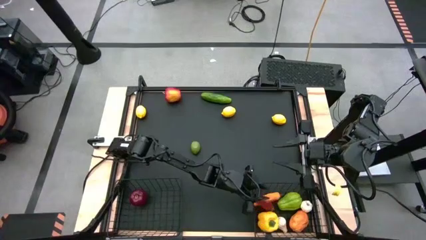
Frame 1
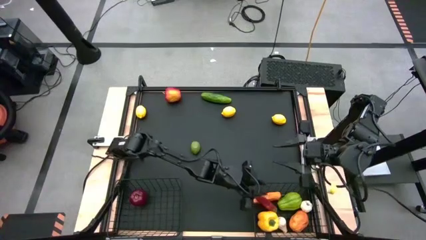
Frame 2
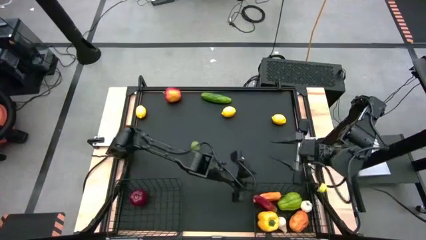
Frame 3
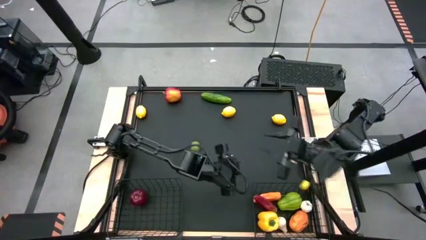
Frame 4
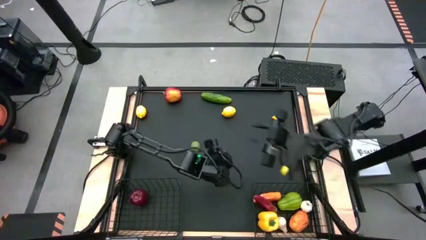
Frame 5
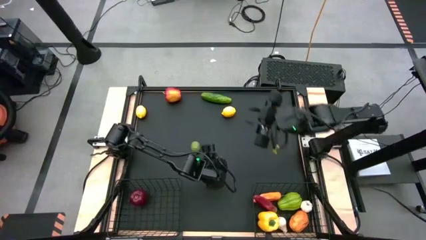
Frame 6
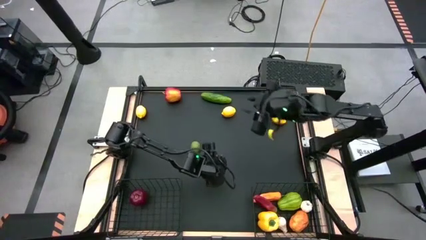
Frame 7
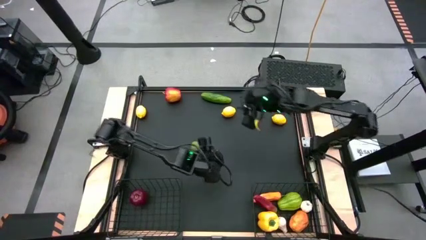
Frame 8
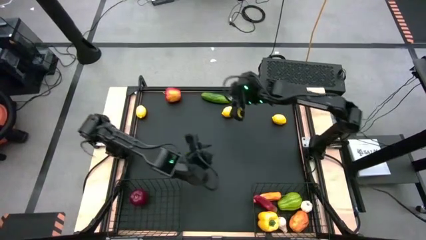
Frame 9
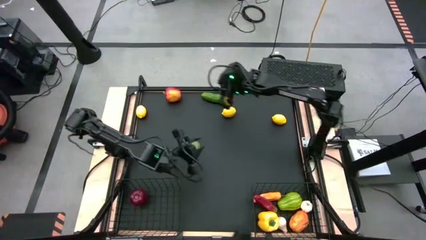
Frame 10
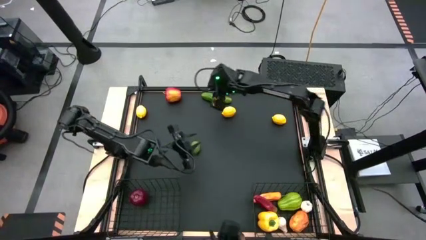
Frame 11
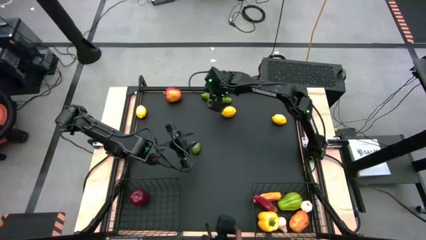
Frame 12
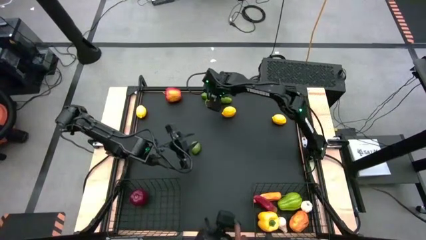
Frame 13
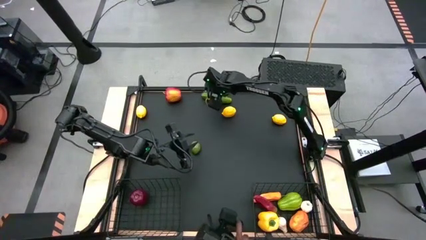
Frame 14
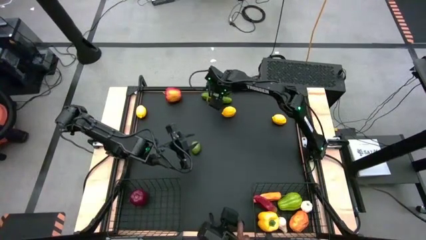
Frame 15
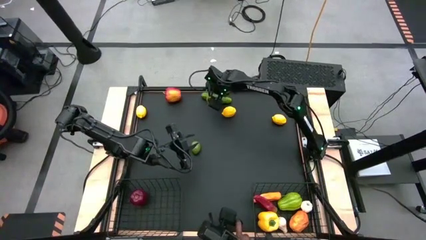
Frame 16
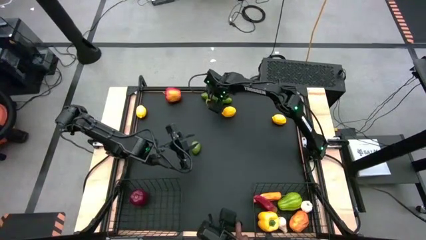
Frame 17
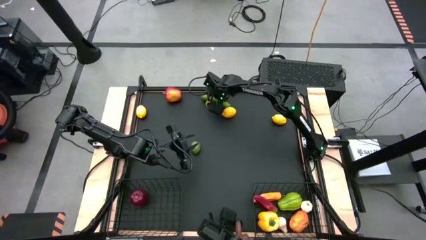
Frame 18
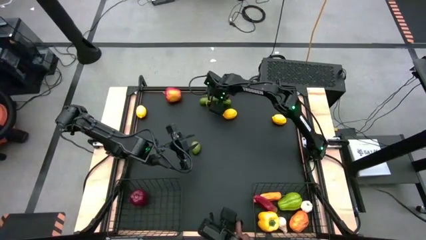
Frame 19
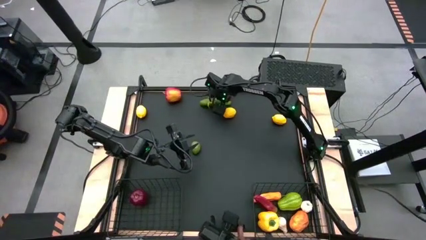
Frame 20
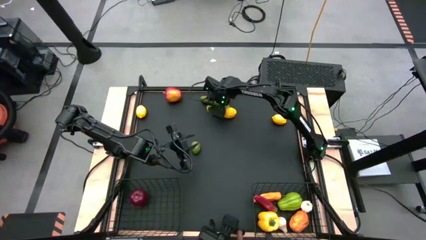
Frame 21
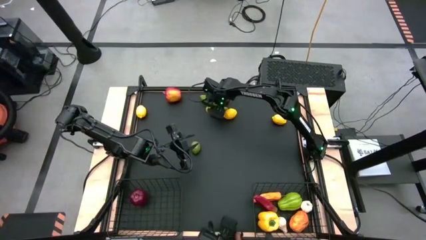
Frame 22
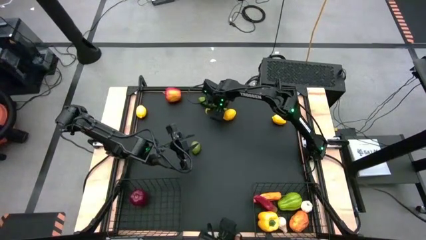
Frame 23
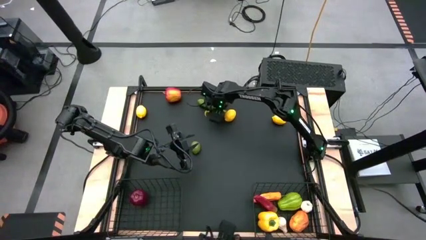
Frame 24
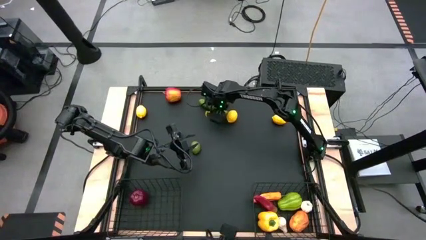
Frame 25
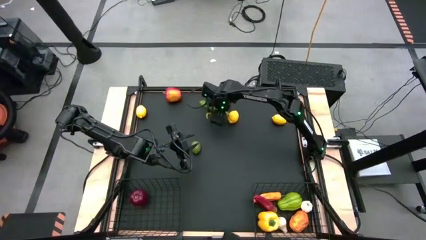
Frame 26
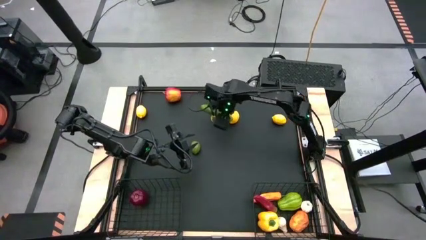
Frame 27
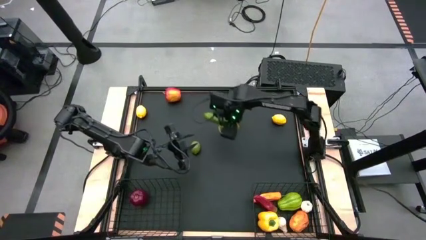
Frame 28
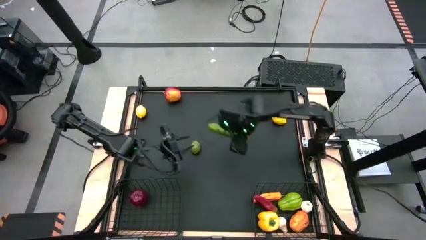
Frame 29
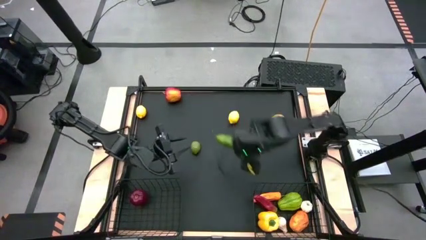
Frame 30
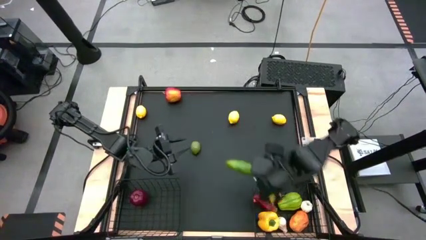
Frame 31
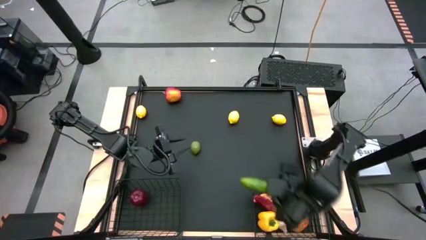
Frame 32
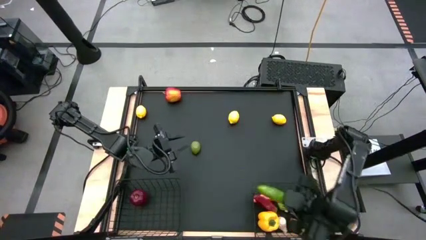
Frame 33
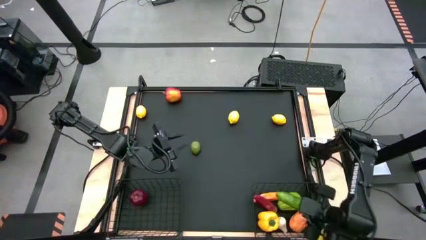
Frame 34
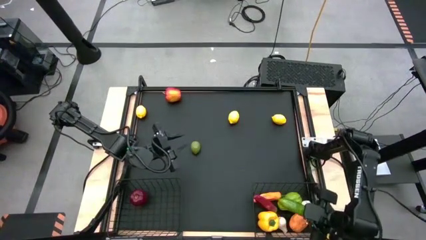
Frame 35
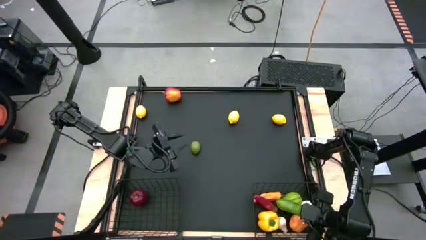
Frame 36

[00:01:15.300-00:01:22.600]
Task: Sort produce into baskets
Put the green cucumber into the right wire basket

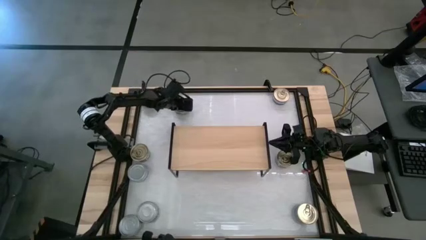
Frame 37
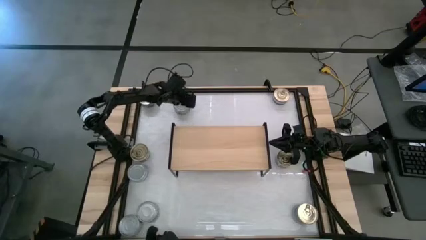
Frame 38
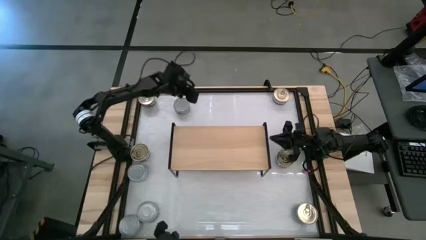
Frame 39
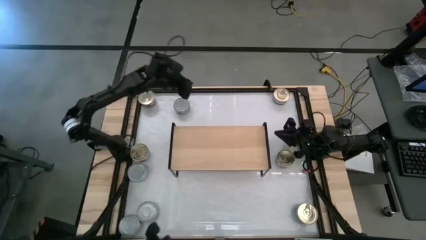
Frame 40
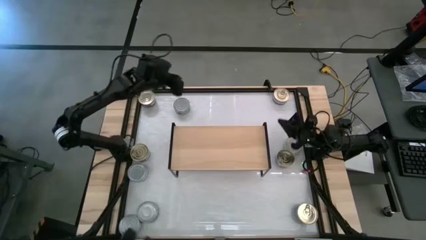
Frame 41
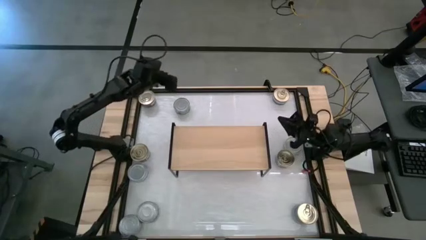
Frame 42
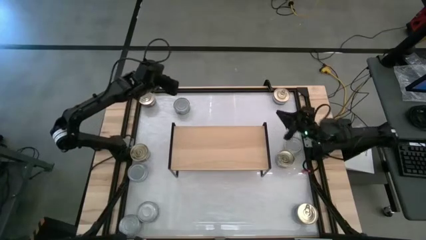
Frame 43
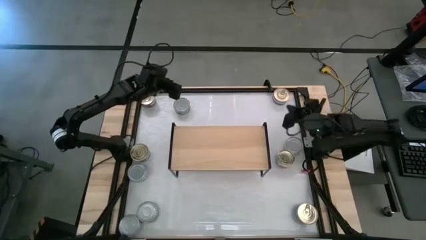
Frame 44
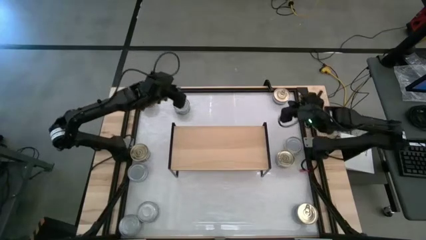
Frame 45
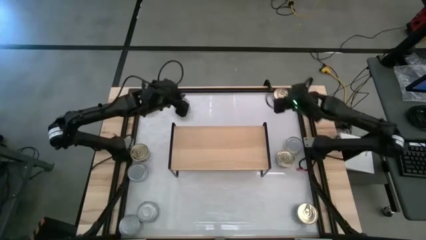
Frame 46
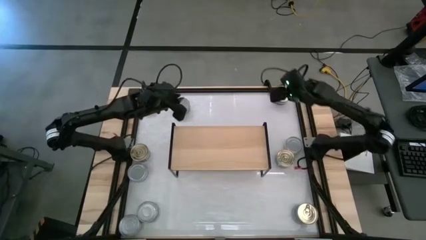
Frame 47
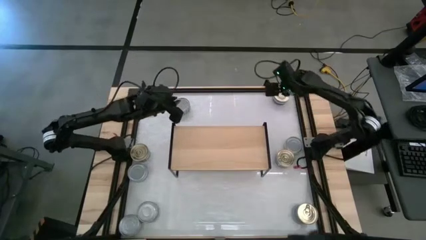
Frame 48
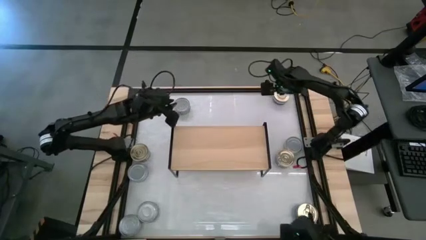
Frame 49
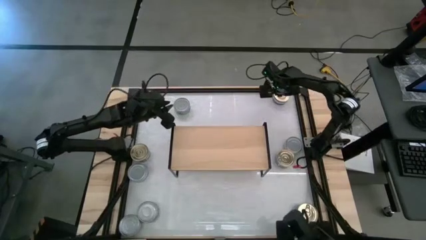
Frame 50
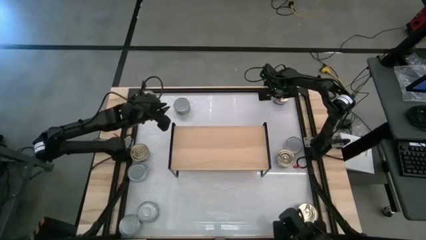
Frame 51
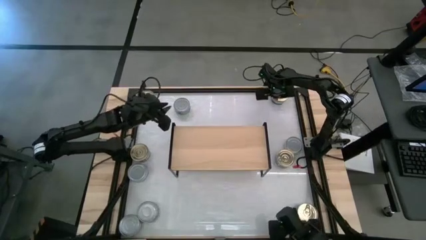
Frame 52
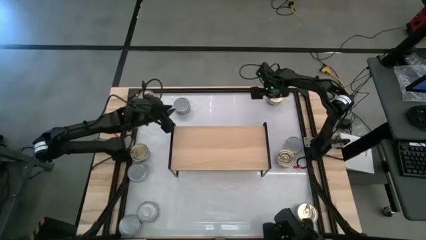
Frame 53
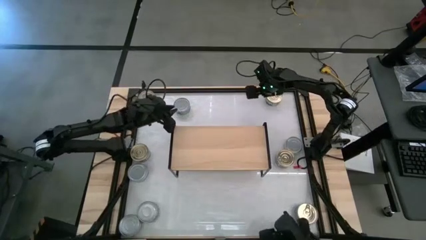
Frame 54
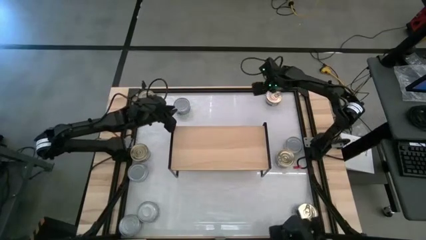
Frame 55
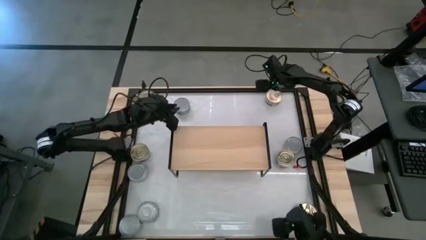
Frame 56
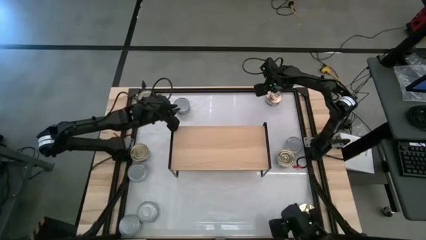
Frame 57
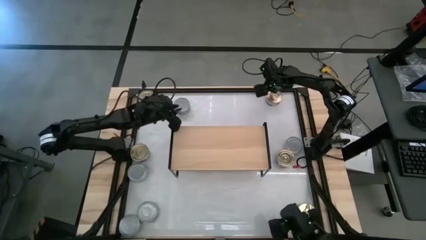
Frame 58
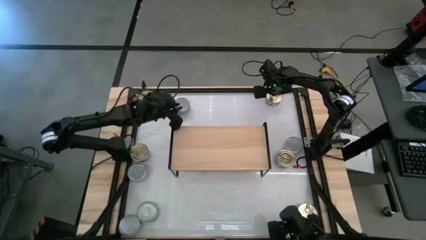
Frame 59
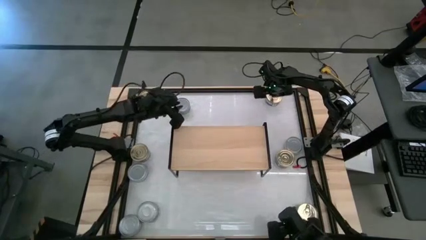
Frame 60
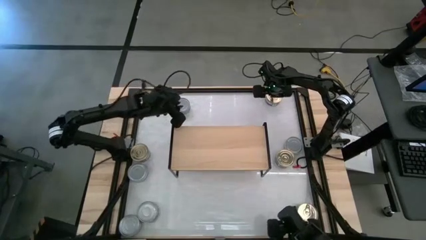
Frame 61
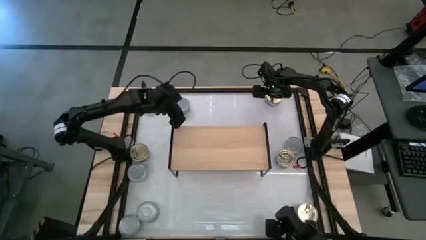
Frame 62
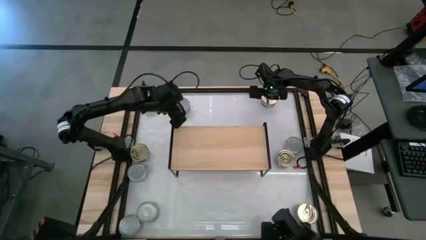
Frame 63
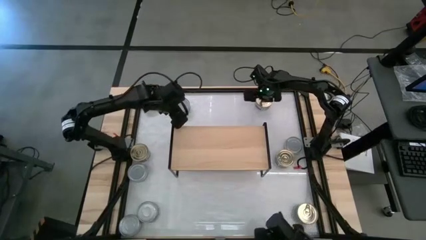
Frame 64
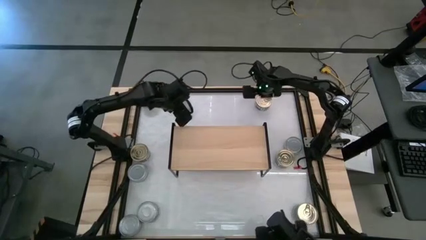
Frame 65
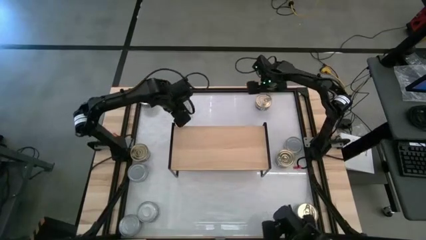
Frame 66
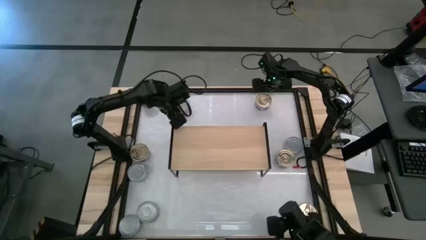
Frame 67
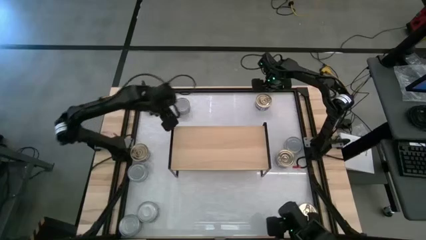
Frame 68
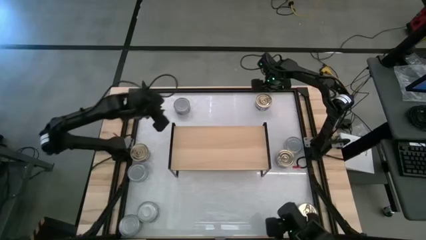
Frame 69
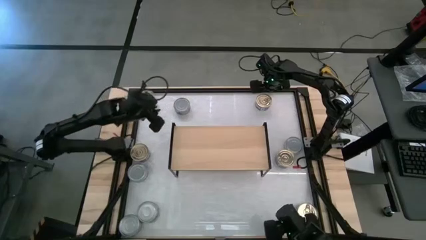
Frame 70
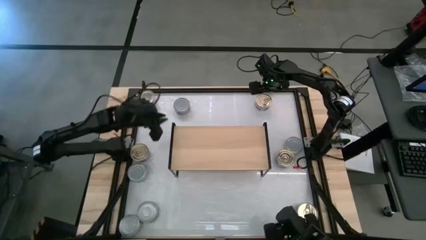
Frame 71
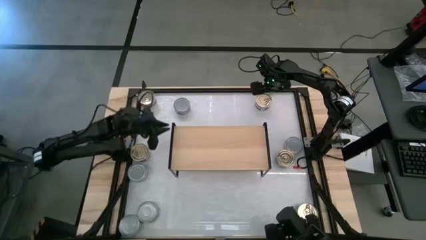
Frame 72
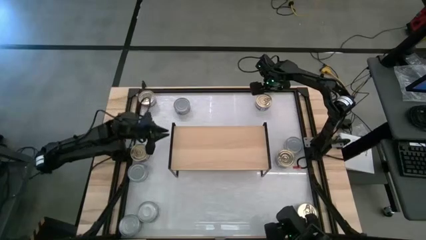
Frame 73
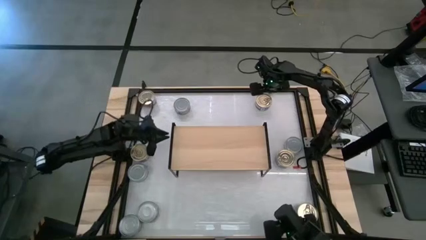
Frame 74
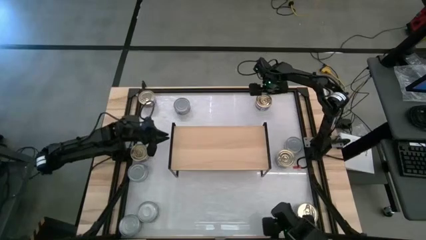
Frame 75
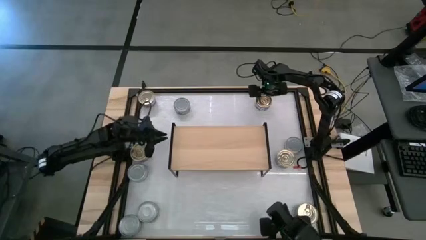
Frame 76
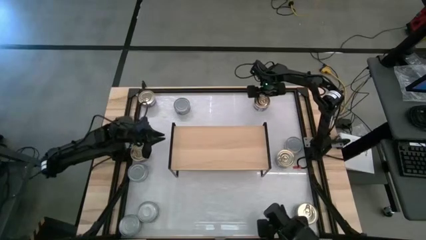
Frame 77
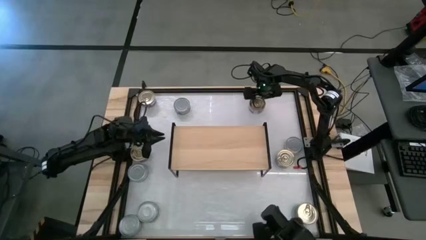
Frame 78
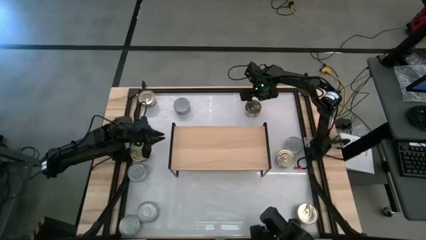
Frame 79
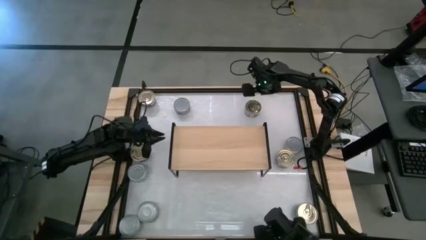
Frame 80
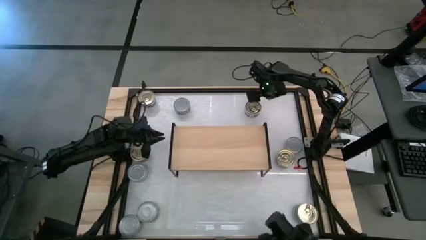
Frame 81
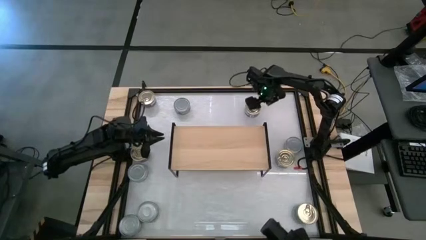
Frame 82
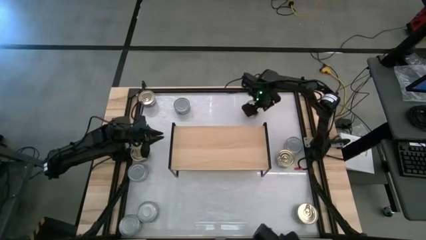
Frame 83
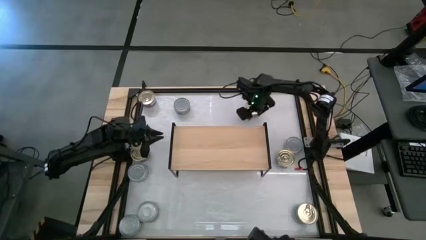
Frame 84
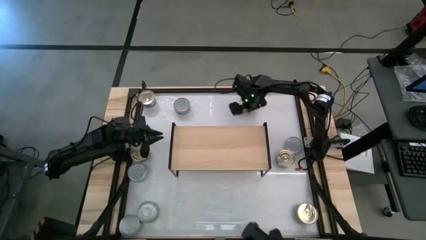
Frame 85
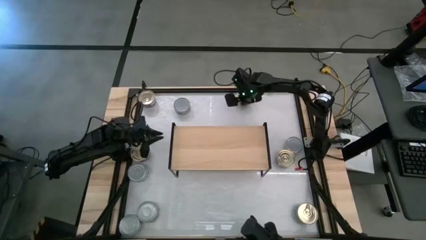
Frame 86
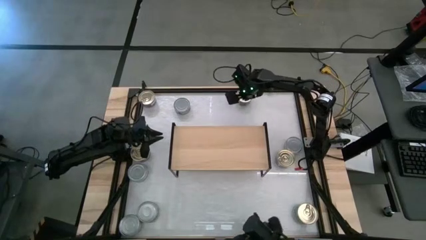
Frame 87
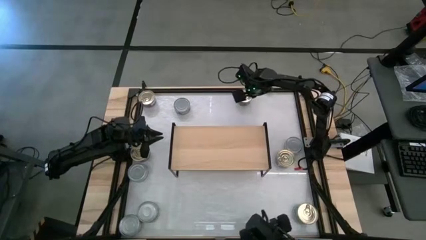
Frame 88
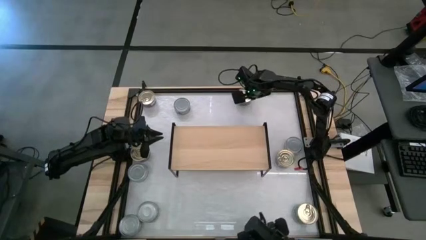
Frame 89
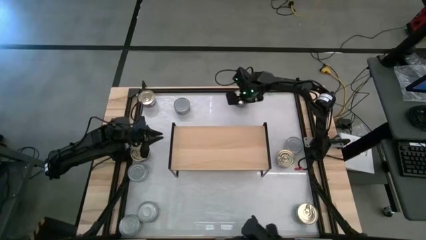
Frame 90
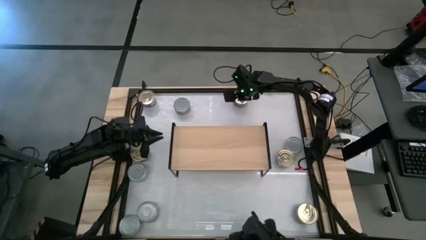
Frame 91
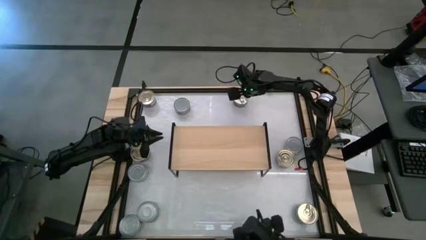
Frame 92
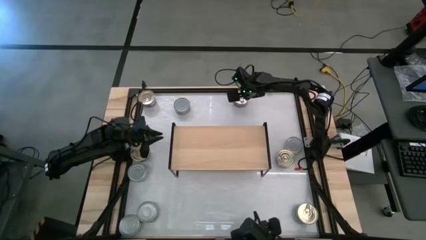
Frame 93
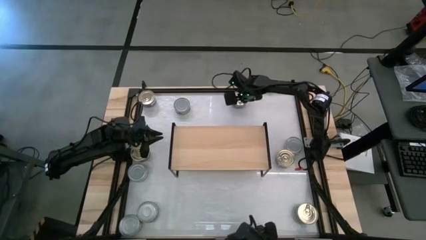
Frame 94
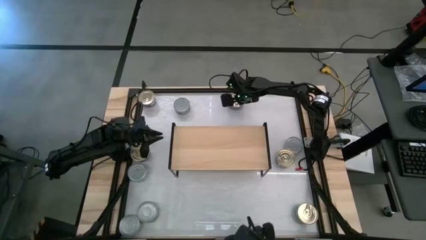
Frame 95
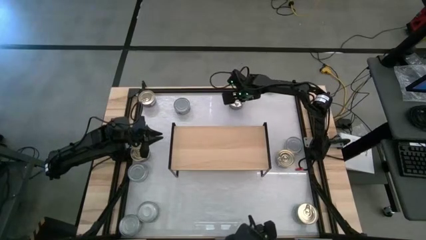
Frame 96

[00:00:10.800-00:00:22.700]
Task: Stack canned seafood by type on shelf
Put the blue-pink tuna can on the shelf
